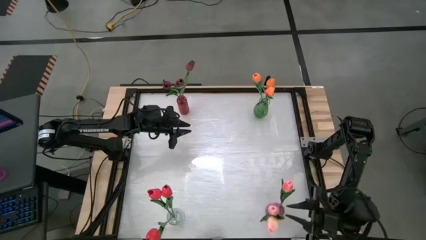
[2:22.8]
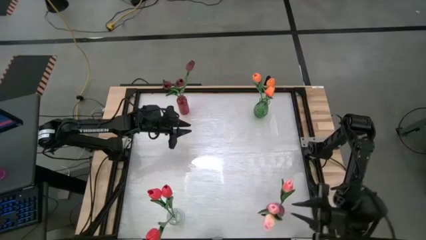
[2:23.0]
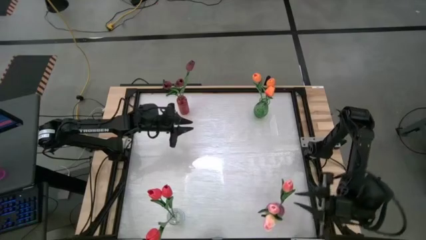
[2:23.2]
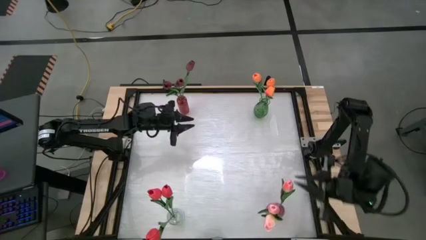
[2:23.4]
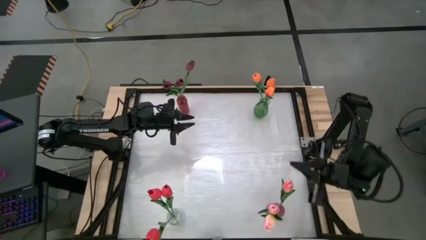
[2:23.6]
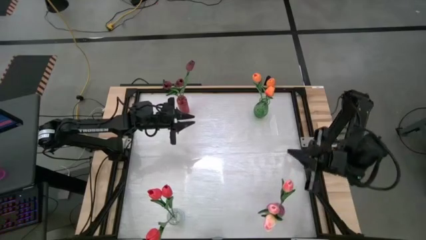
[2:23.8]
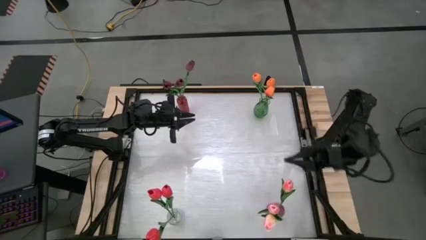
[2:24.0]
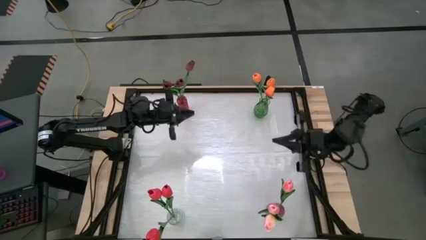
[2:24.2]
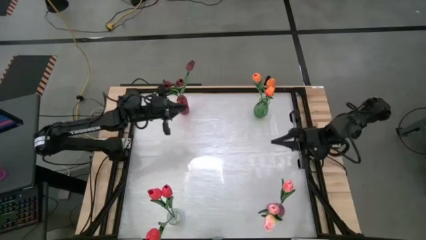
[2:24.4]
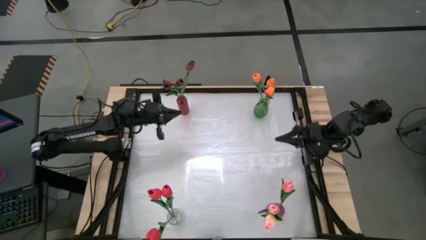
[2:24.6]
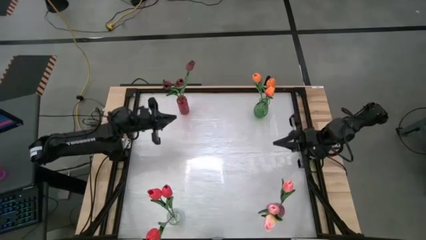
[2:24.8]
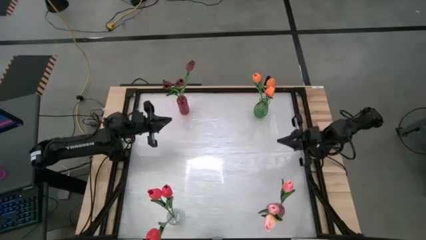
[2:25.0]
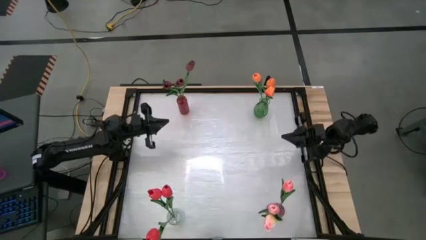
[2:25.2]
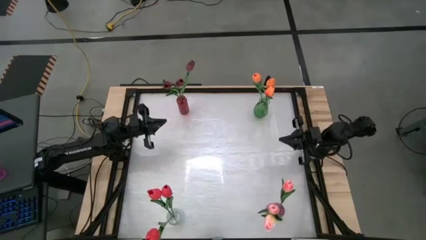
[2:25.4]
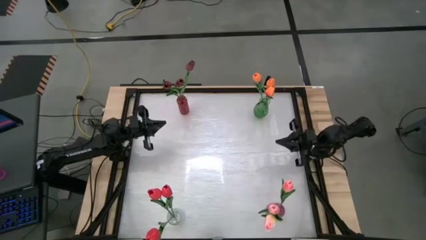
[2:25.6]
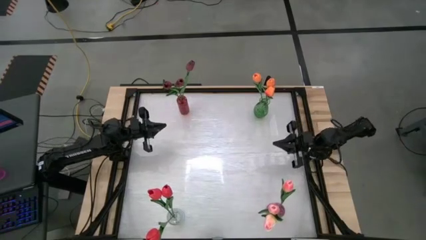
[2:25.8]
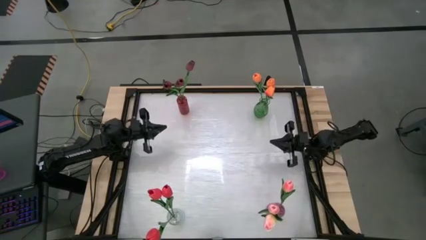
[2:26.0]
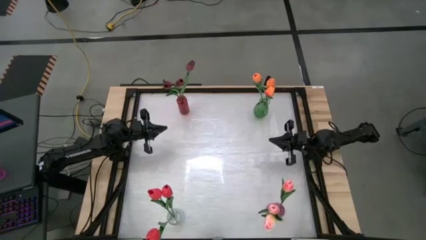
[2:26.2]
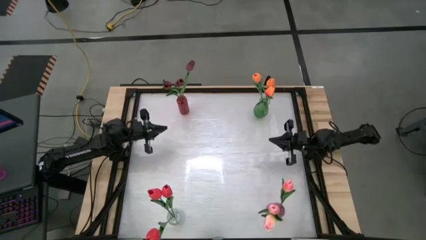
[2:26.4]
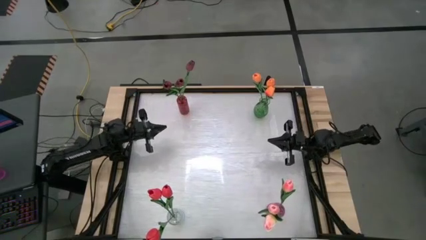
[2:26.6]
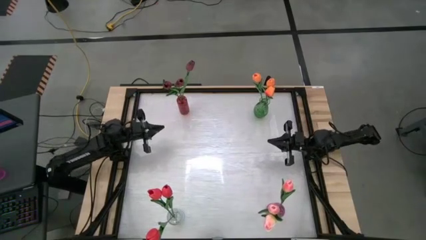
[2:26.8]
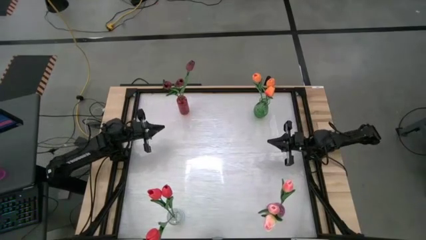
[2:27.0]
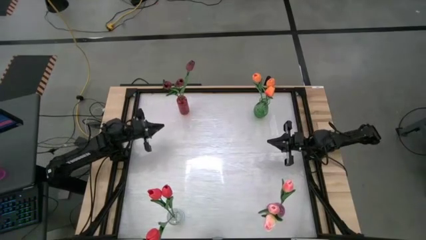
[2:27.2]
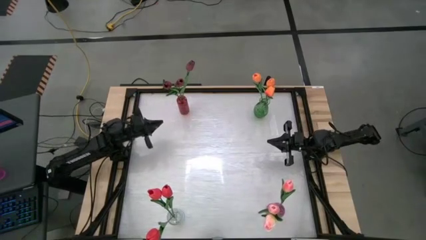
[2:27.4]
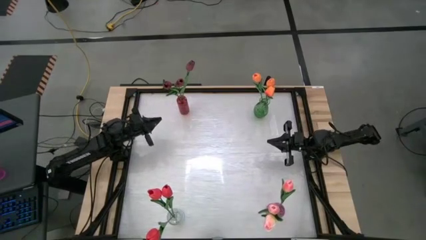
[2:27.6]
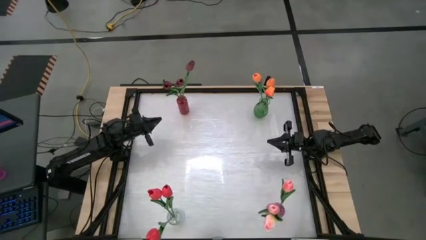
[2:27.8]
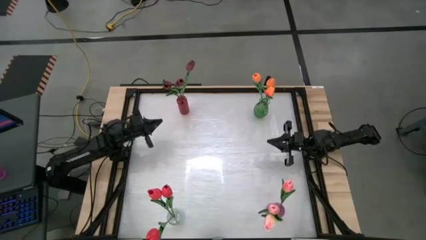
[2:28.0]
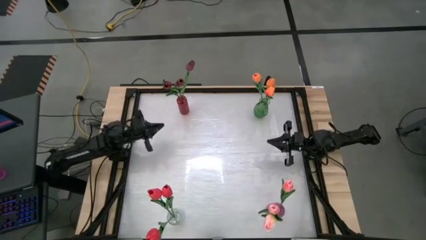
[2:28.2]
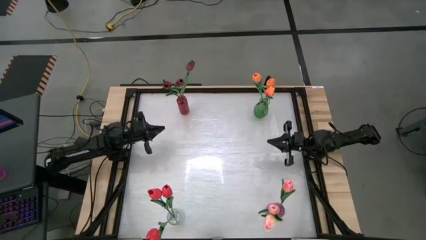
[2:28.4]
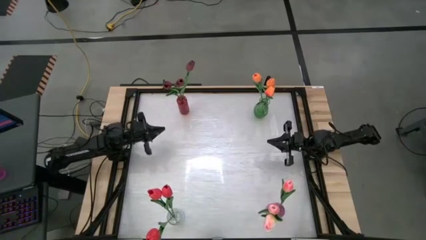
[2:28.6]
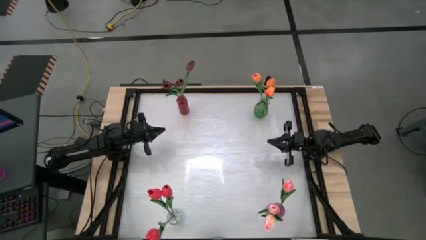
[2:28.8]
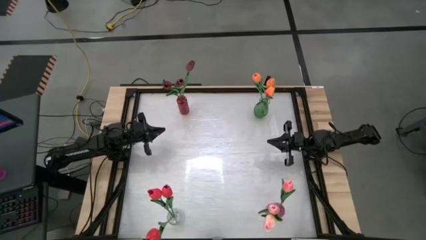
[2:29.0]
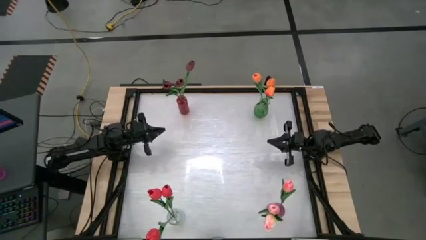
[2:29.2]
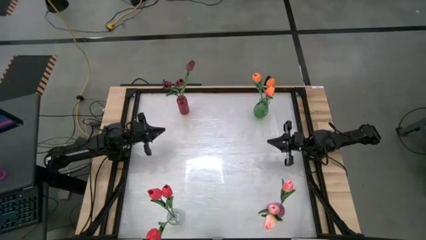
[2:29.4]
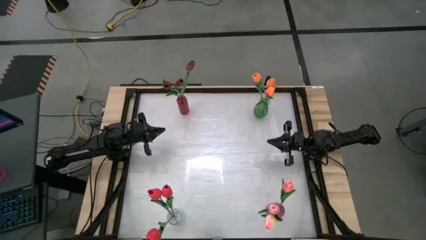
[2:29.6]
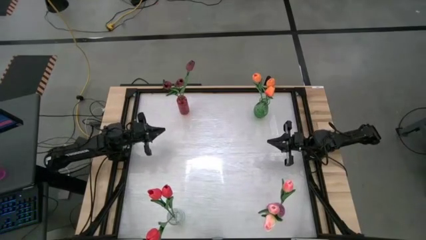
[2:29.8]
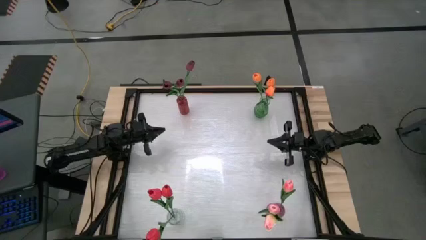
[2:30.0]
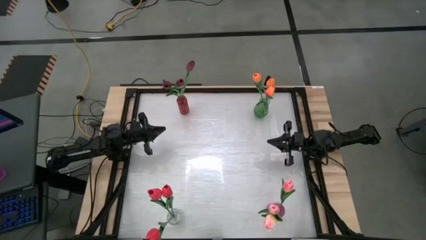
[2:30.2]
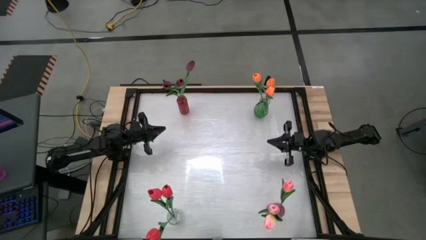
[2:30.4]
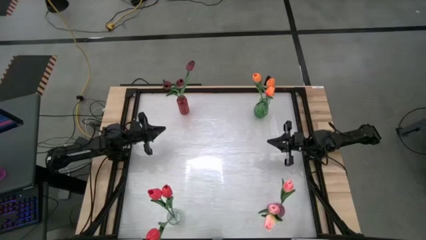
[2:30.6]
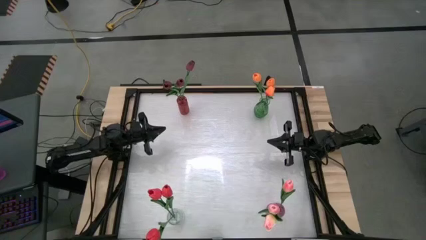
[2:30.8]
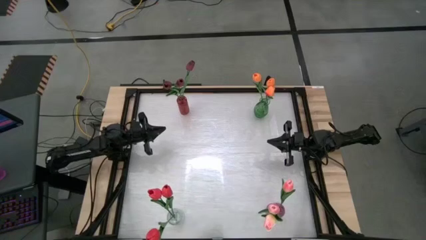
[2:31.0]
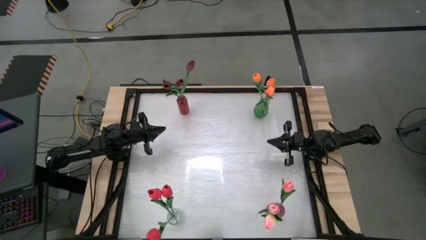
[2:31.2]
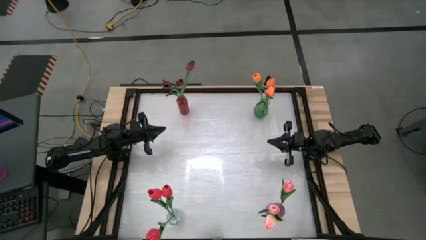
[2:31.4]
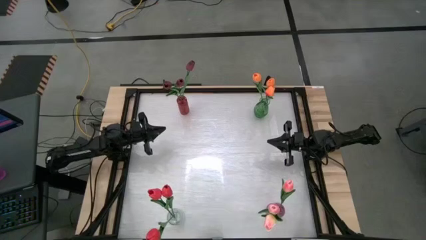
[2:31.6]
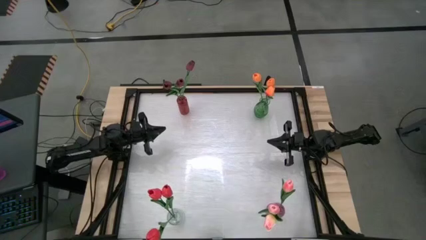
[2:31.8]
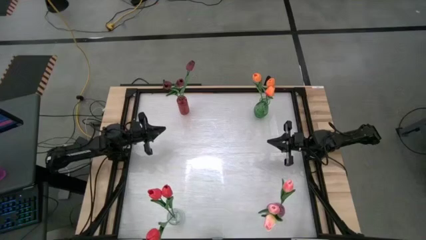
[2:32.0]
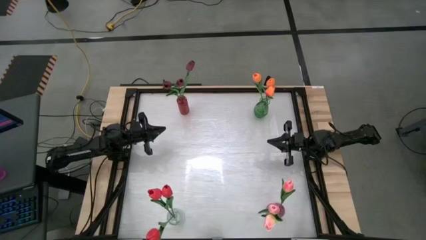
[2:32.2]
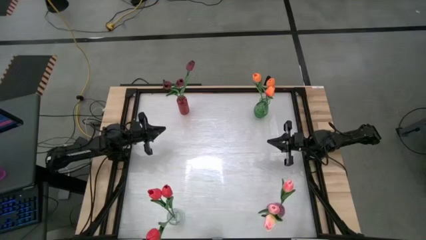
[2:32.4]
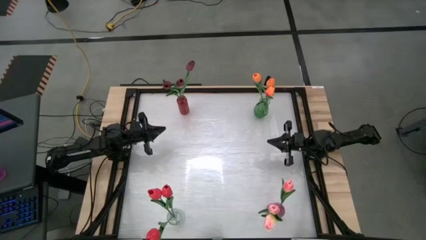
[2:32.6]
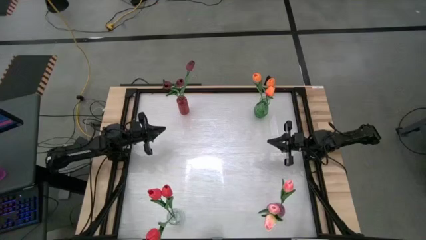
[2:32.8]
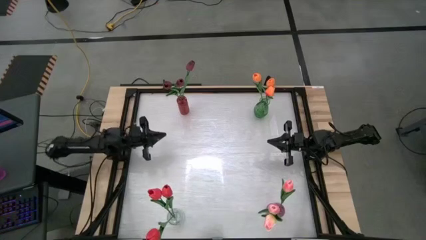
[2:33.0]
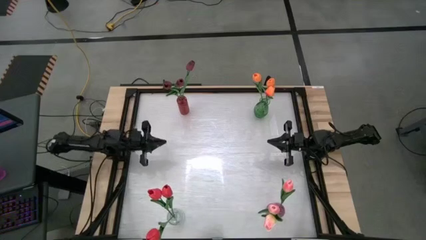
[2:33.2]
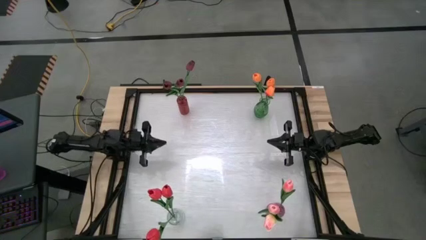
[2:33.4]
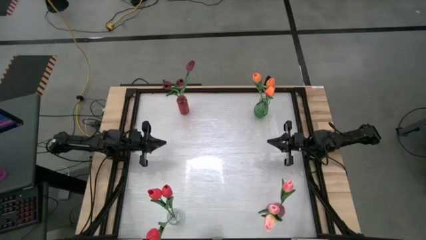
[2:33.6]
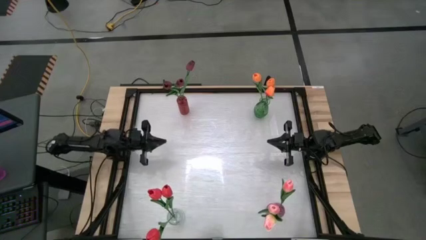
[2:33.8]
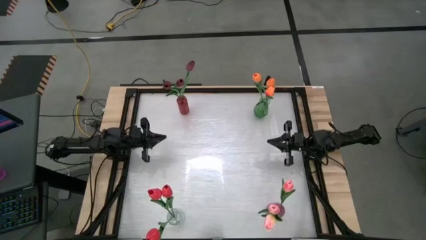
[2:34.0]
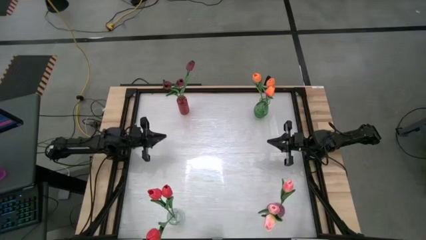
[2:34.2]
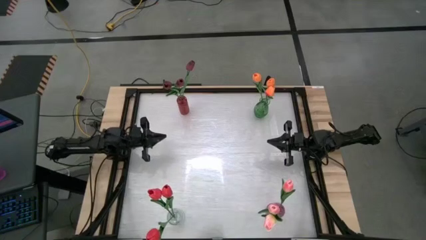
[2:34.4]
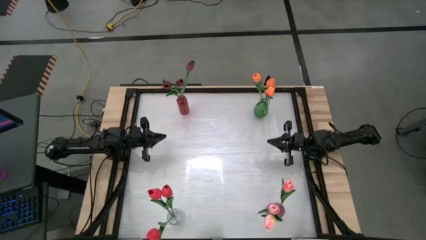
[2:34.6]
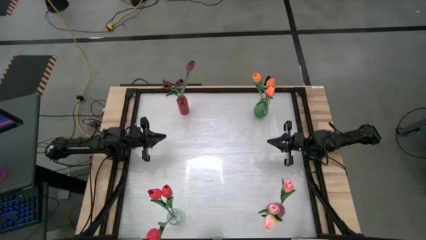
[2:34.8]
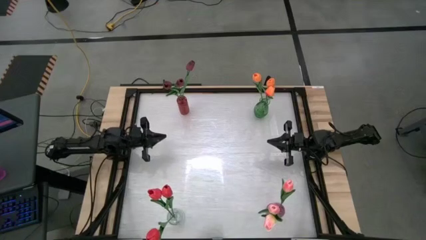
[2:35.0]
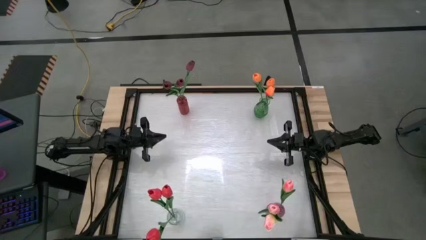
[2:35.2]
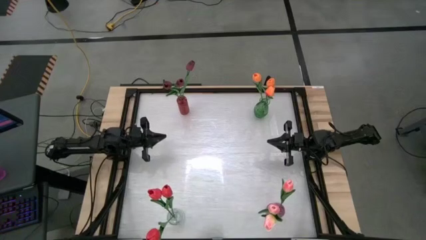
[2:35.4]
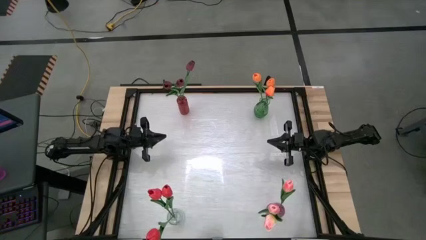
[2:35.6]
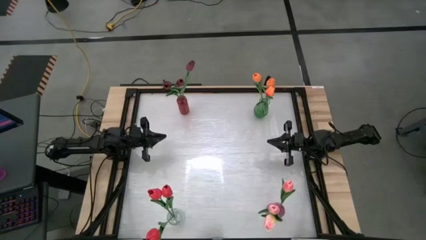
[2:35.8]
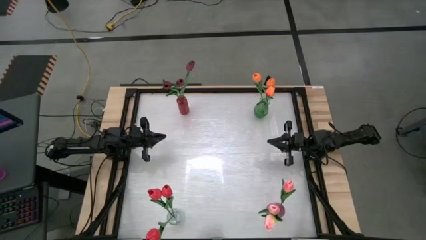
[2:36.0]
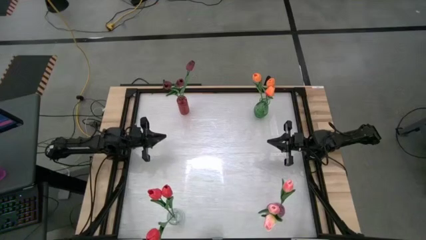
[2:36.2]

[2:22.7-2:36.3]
Task: Sort flowers into vase by color
Return to Home Position

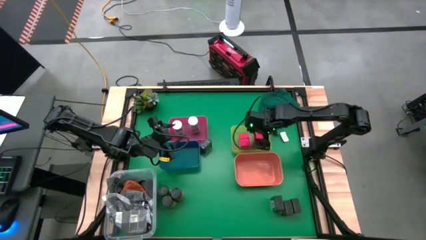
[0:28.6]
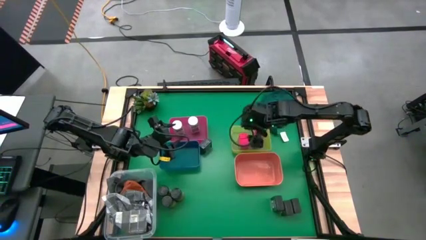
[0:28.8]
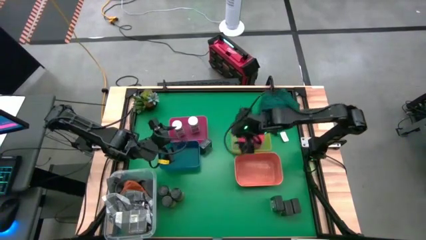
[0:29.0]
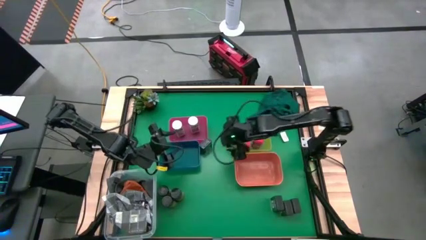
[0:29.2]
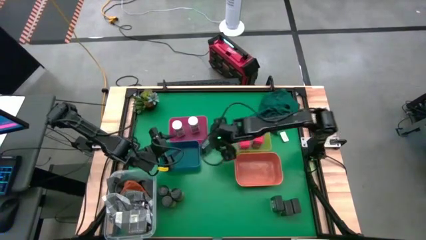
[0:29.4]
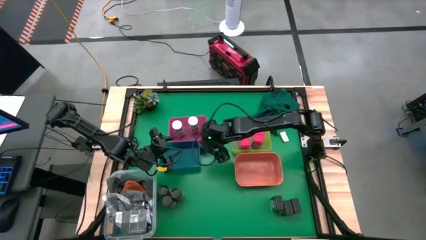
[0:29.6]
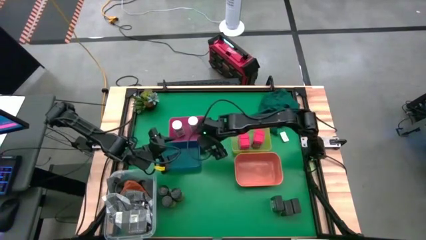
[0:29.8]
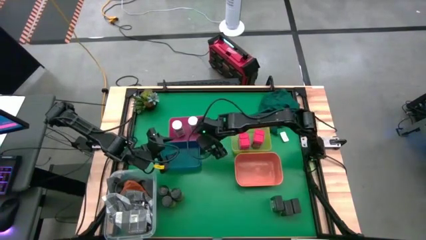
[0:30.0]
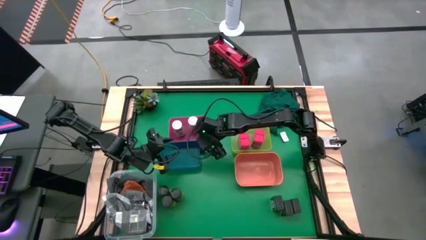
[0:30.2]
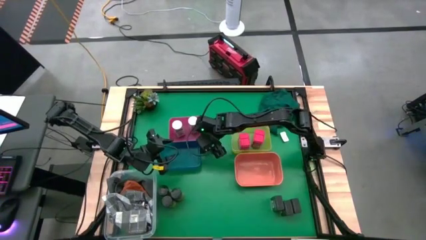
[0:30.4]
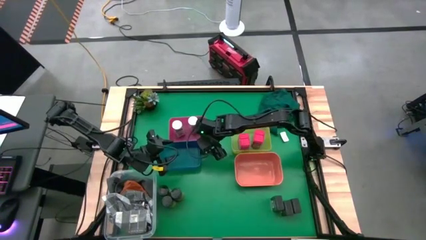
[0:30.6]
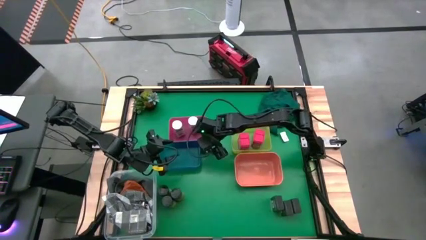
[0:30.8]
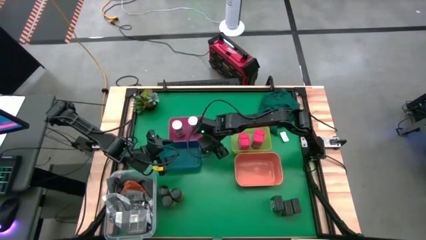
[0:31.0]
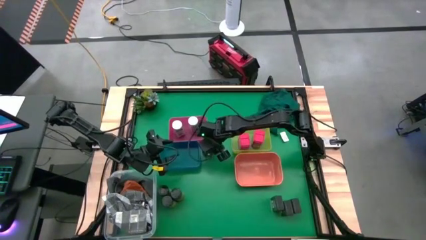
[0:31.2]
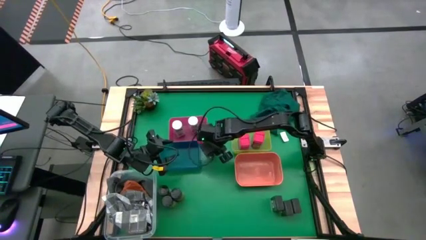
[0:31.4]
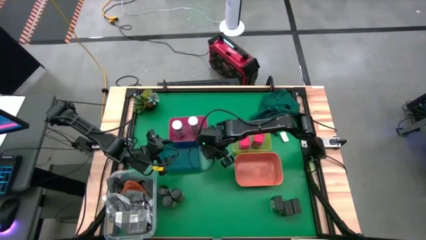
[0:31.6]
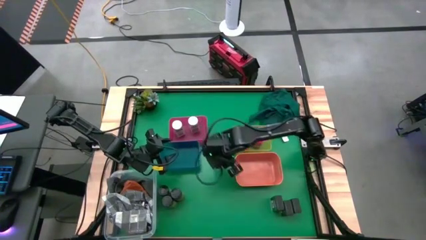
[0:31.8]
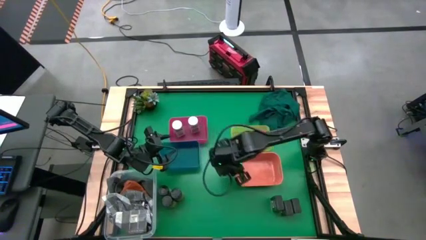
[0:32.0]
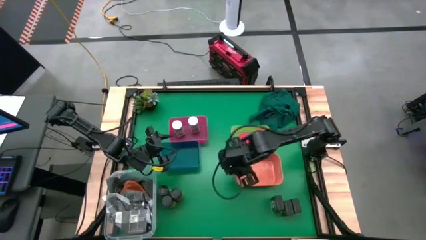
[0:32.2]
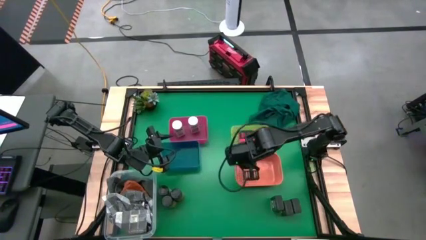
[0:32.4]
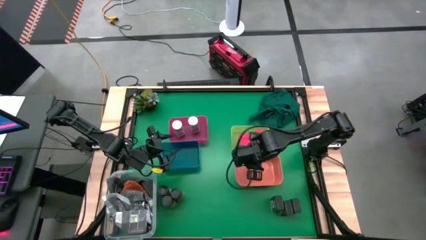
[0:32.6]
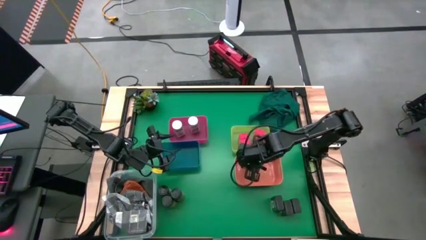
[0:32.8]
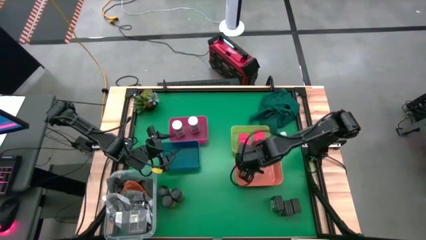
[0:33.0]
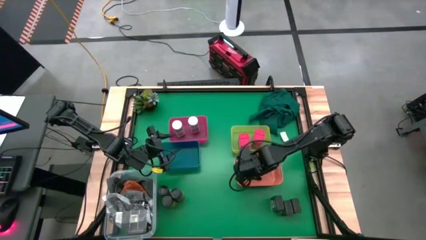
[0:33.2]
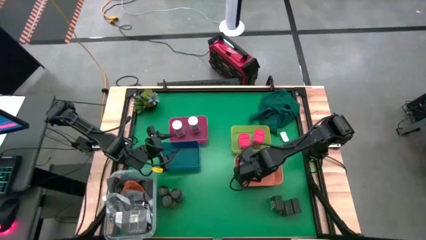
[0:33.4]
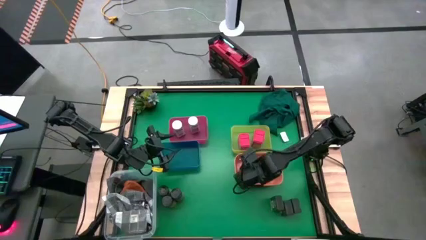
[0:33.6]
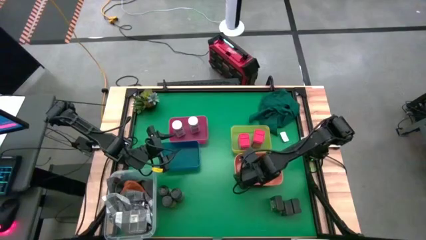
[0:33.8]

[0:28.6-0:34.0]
Task: Sort spices by type
Put the top black seasoning can into the orange bin
